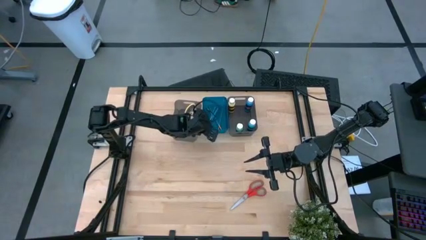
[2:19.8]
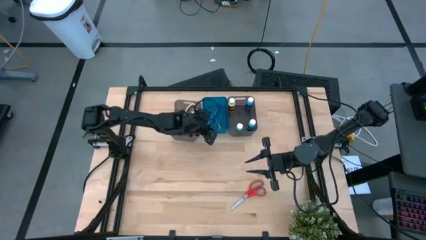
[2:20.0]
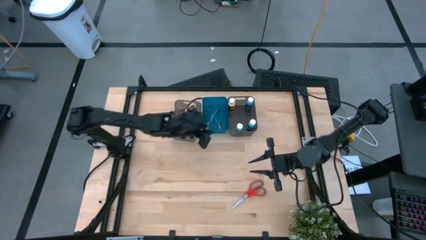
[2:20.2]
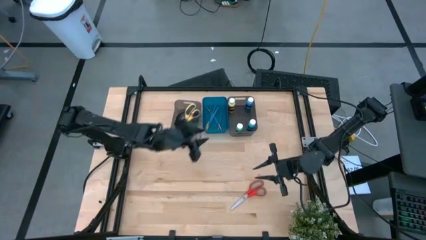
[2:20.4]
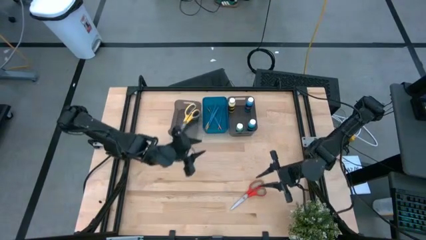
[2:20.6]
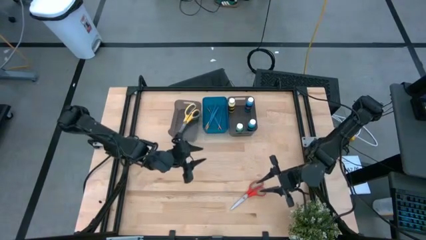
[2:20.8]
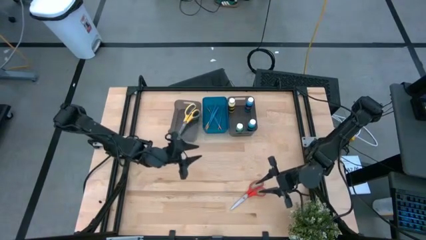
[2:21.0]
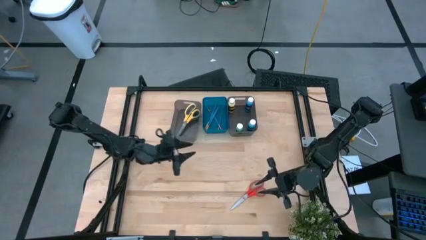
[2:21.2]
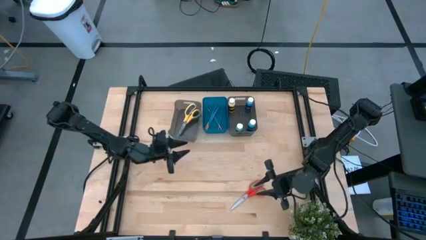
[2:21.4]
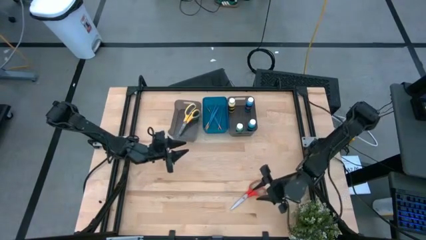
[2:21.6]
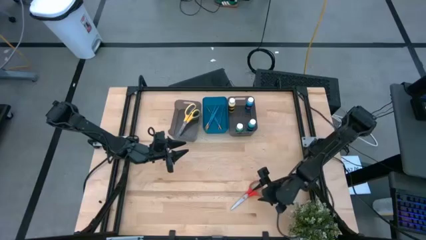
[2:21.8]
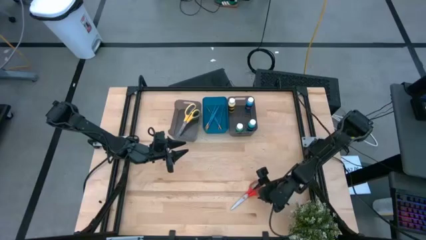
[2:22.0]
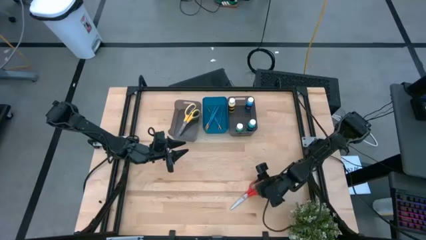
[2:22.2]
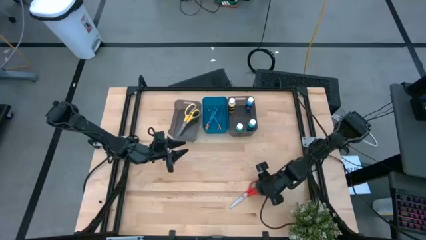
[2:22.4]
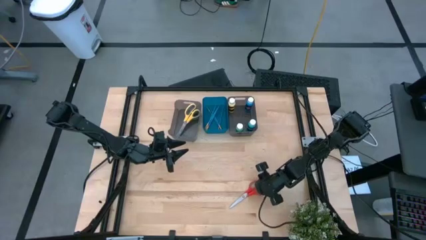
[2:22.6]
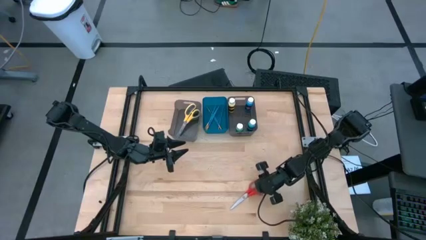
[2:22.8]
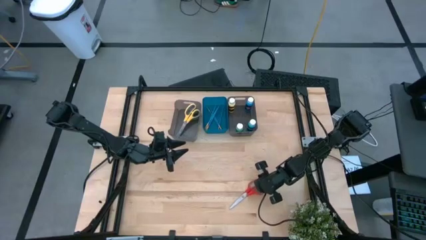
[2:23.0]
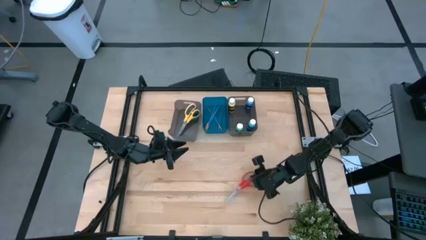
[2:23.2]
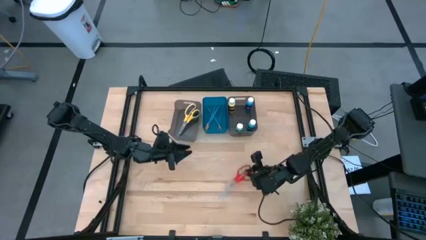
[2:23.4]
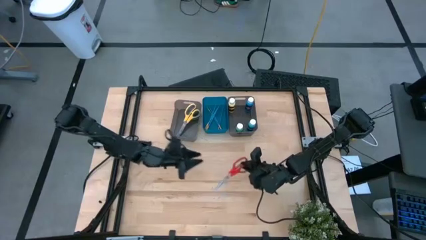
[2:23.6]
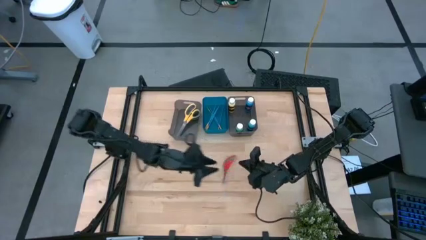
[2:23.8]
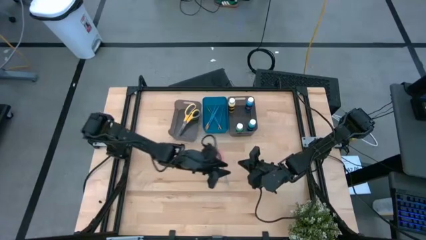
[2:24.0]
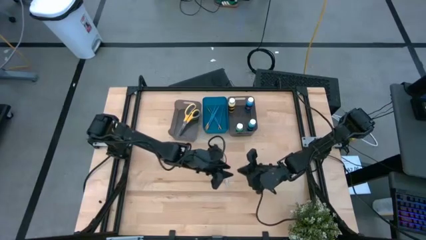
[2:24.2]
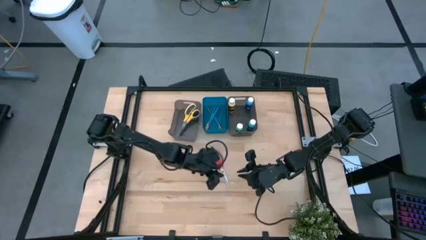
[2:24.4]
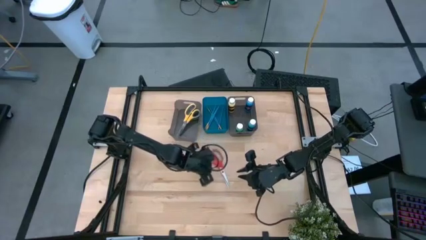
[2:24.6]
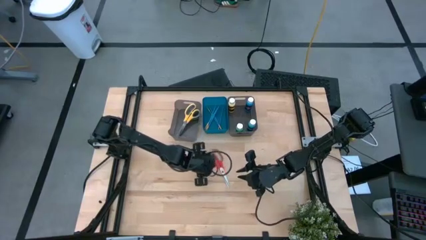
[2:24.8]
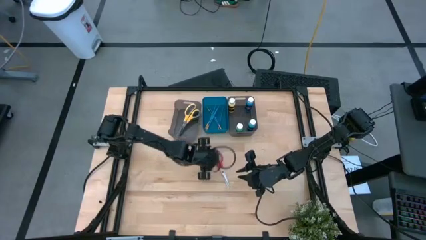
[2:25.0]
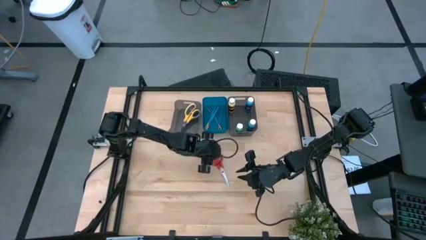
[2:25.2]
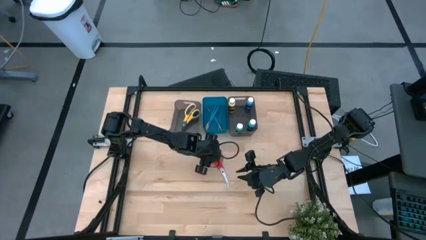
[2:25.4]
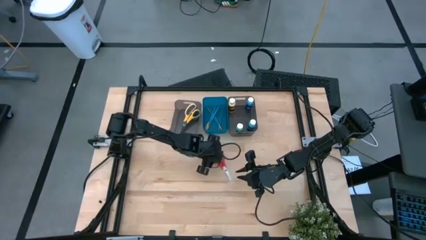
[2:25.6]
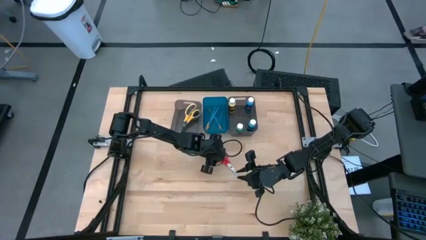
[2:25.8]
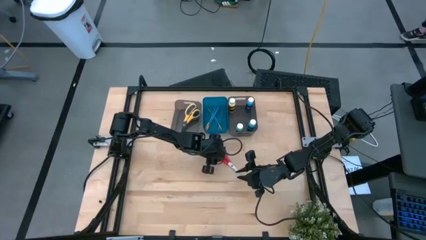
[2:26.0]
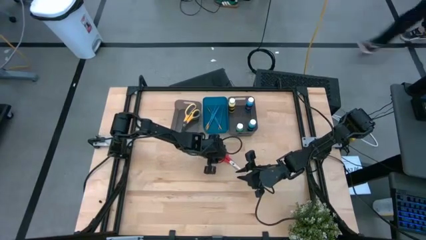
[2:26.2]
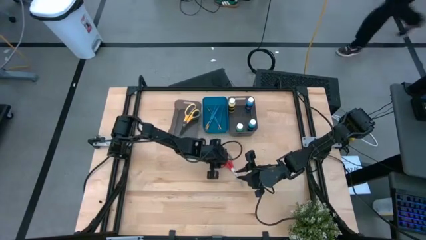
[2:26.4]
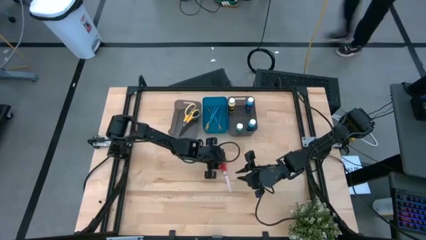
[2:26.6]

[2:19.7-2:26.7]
Task: Pick & Place Paint Supplies
Put the red scissors into the left gray bin

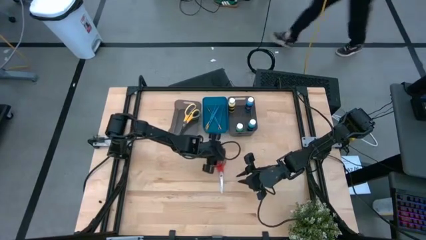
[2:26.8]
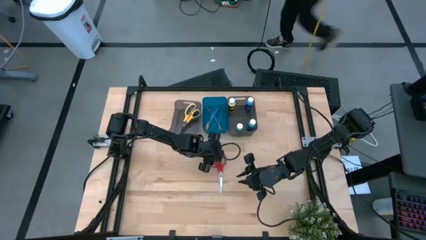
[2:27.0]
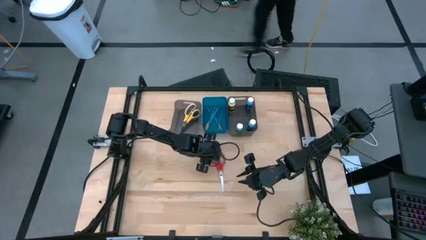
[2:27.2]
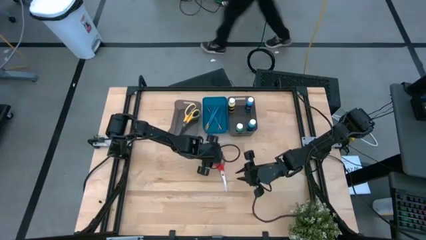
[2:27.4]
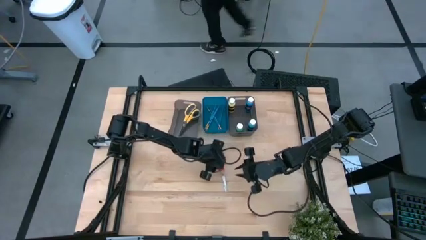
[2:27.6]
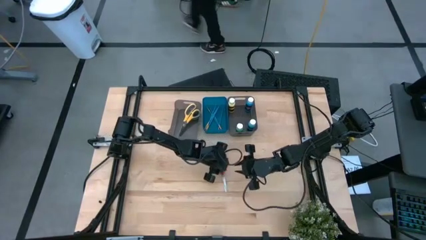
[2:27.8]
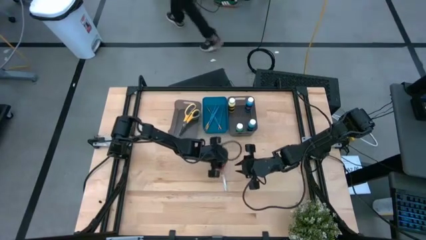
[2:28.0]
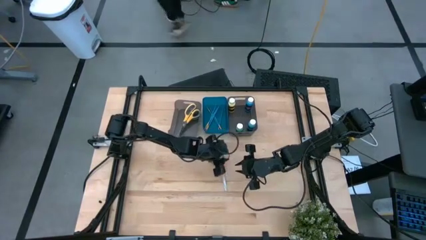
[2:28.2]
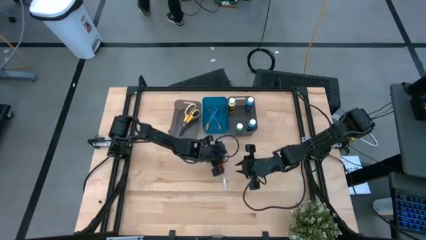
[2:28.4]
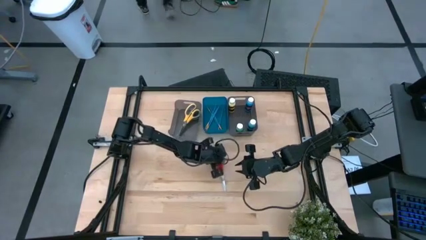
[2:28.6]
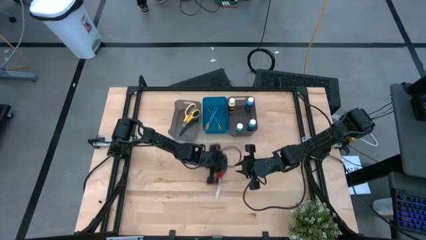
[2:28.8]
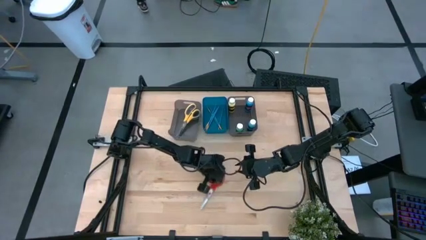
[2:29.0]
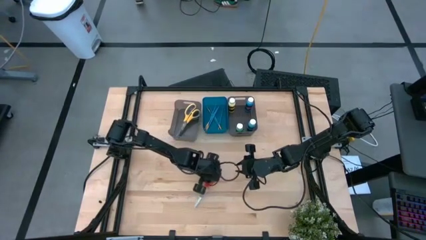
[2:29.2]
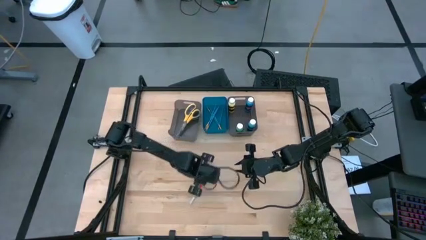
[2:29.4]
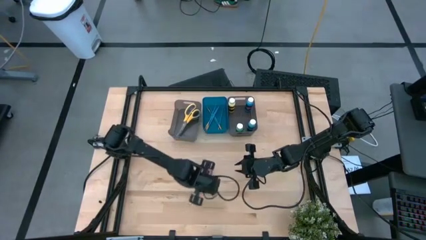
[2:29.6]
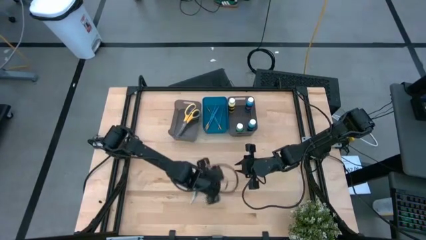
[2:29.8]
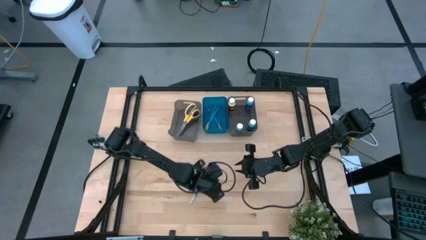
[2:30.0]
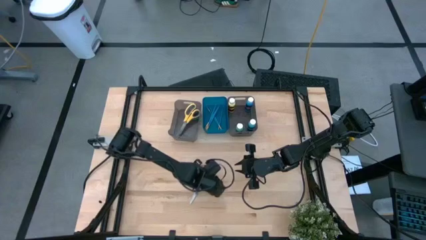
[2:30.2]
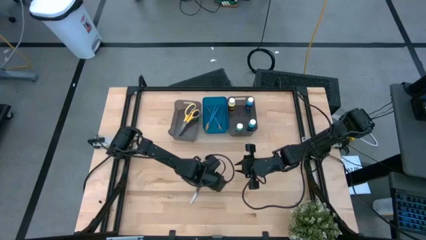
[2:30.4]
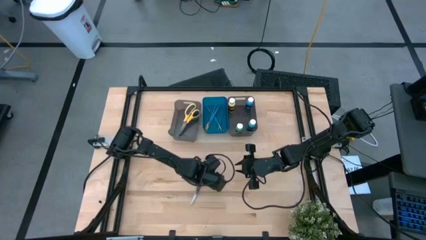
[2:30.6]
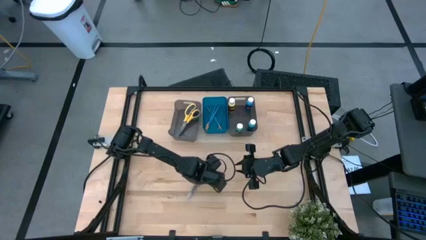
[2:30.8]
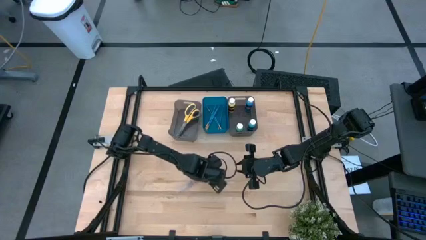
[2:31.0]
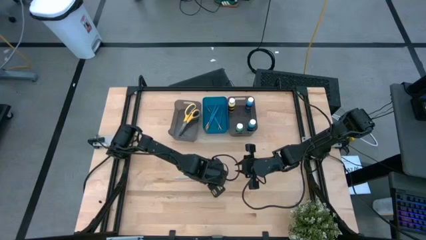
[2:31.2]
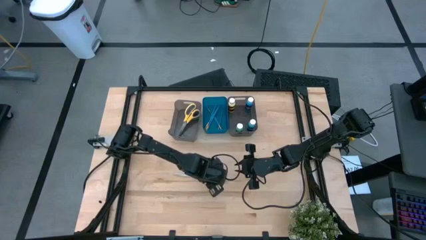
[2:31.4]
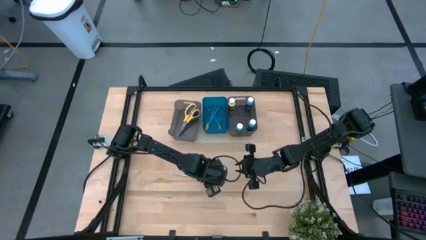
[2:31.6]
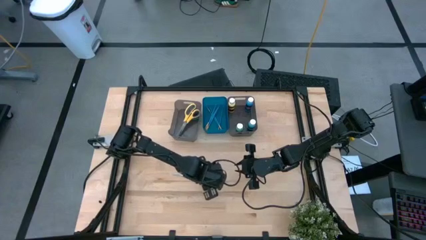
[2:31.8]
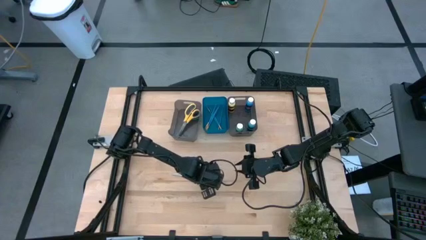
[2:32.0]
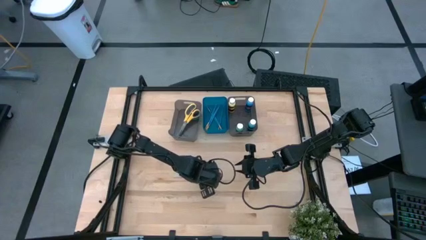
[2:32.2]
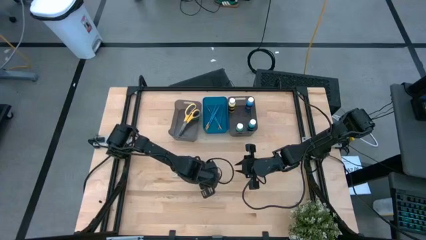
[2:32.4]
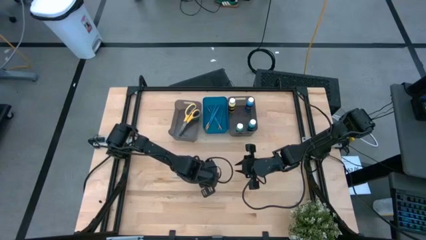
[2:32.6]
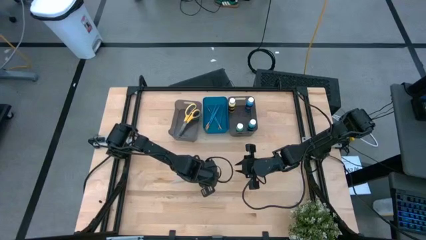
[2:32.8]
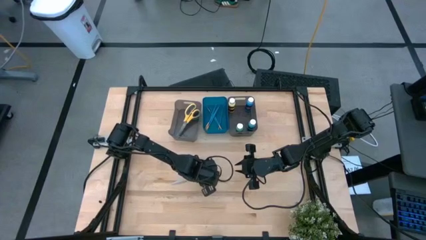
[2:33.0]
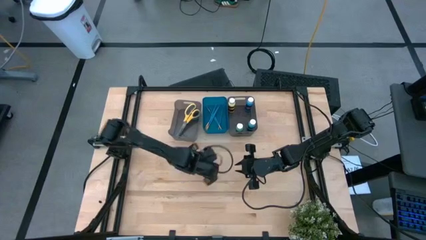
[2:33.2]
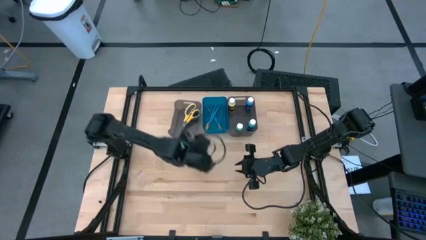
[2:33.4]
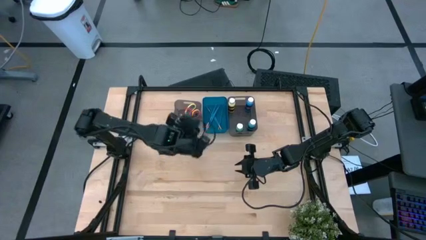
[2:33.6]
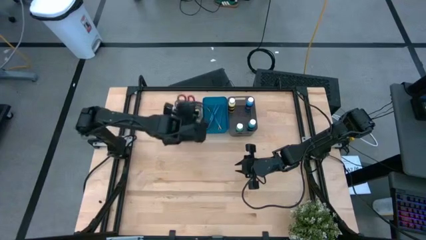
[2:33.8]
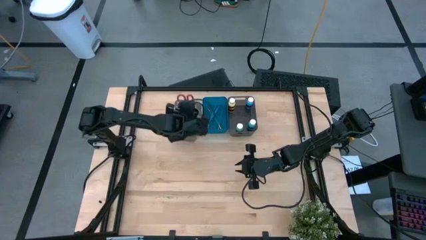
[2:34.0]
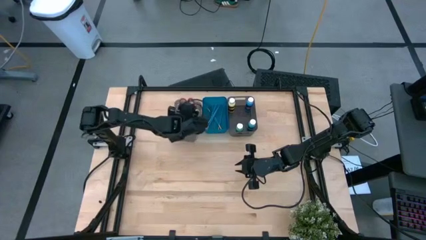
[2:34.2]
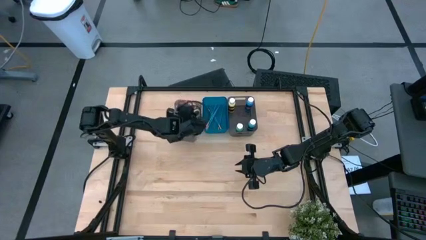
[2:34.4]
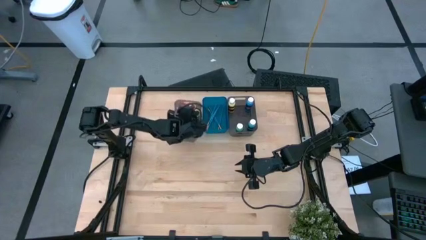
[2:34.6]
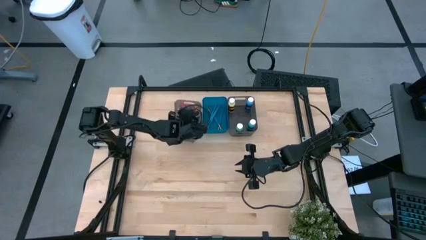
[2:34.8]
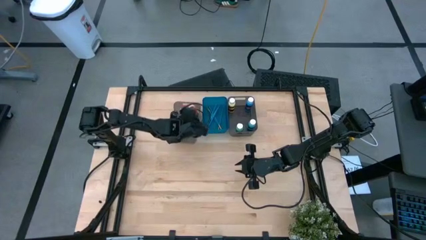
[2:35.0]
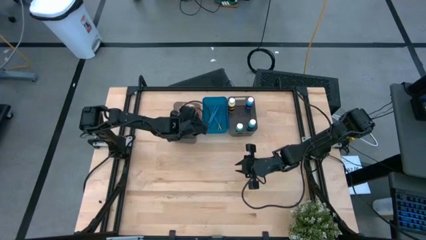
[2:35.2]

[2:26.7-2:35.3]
Put the red scissors into the left gray bin

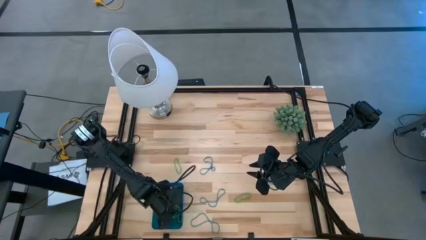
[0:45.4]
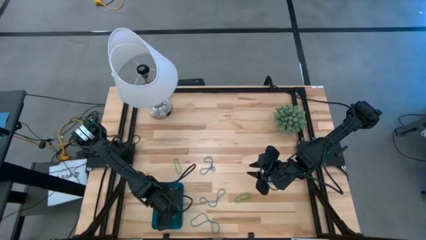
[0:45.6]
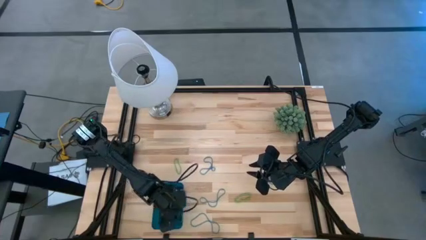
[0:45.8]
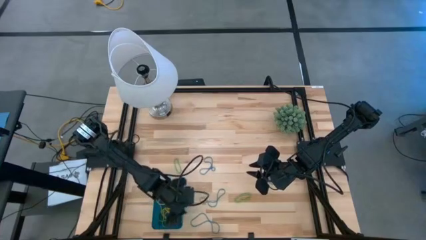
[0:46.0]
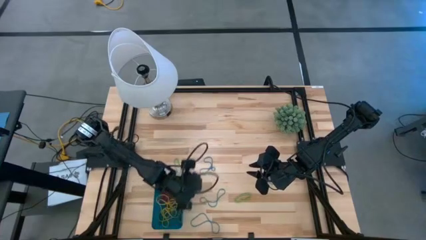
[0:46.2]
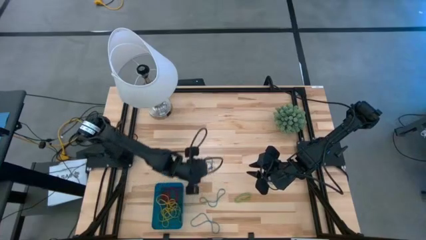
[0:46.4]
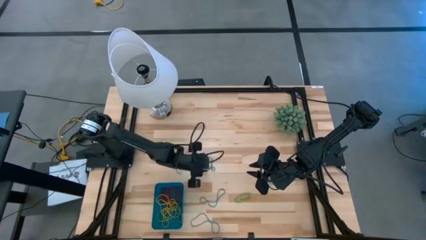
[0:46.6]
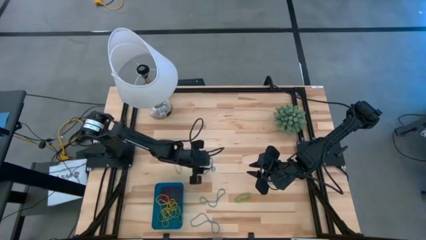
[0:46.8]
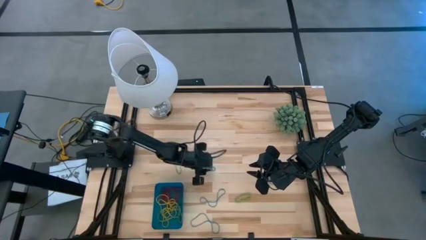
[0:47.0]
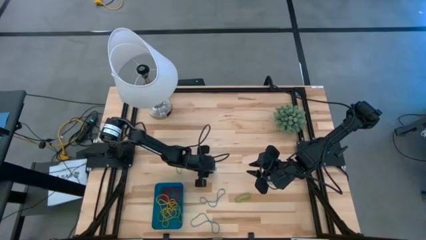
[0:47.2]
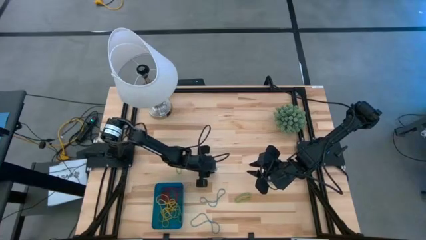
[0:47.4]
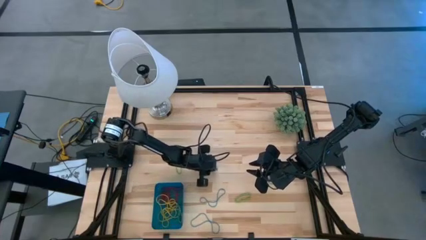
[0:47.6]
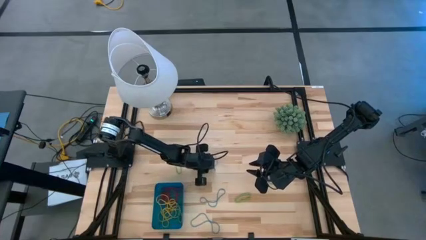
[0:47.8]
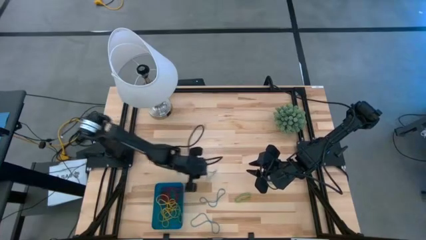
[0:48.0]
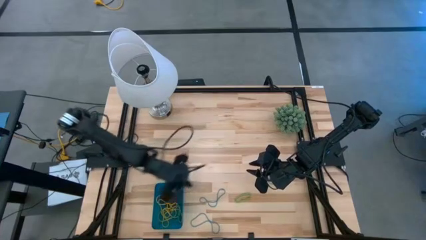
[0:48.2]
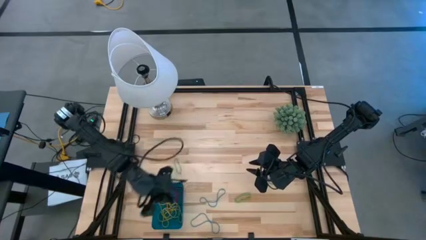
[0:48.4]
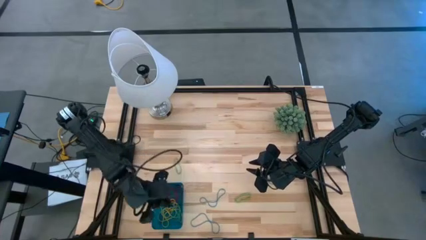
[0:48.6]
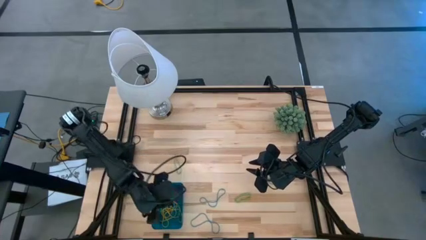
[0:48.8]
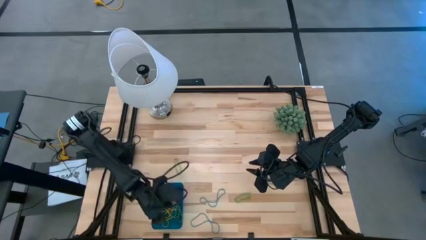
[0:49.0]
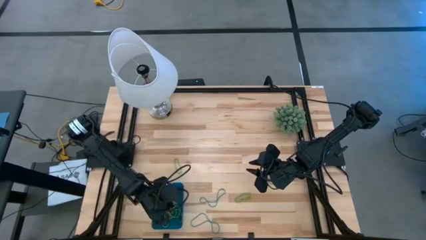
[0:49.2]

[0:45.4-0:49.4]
Task: Pick and place items into bin
Put the blue rubber band into the blue bin
